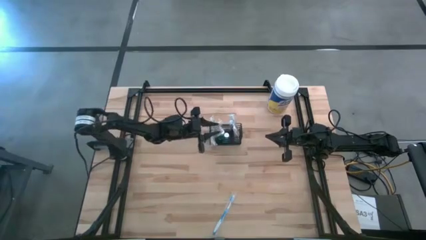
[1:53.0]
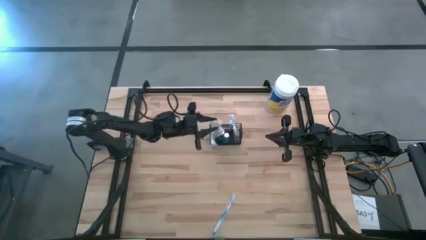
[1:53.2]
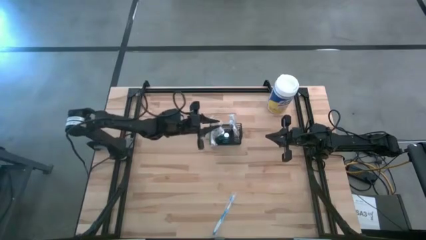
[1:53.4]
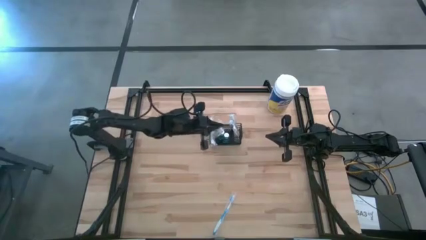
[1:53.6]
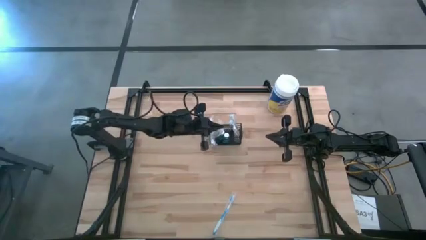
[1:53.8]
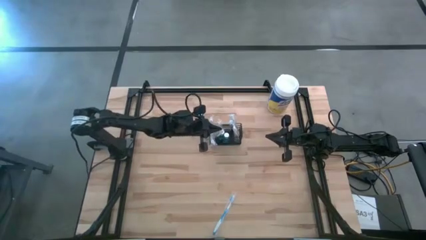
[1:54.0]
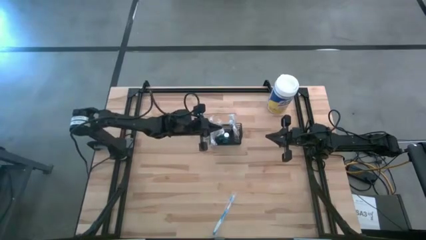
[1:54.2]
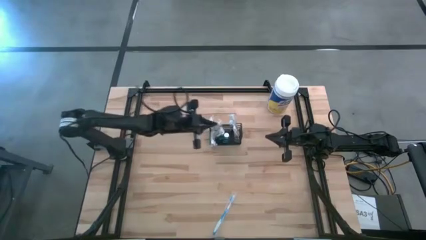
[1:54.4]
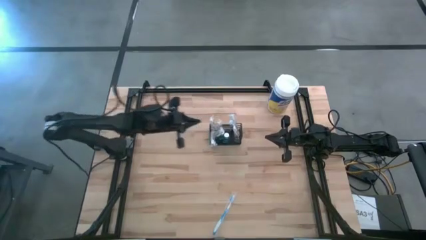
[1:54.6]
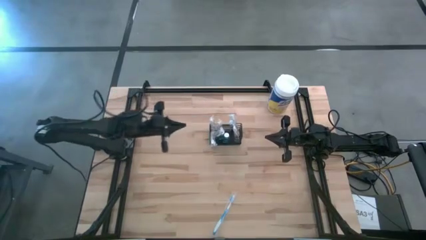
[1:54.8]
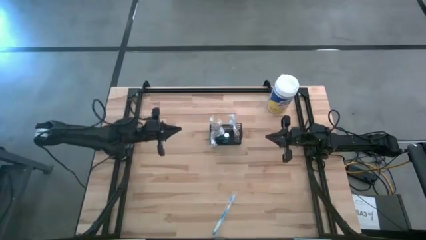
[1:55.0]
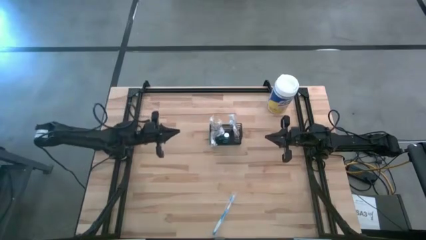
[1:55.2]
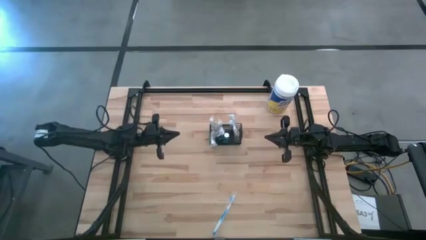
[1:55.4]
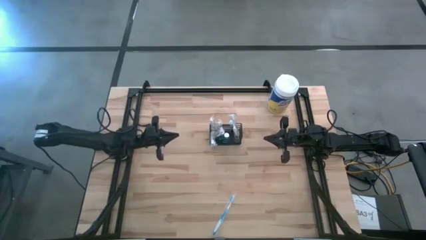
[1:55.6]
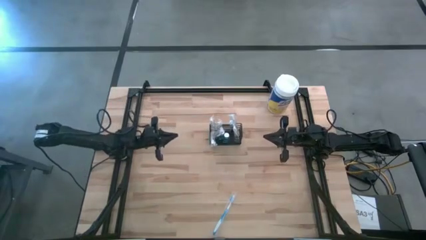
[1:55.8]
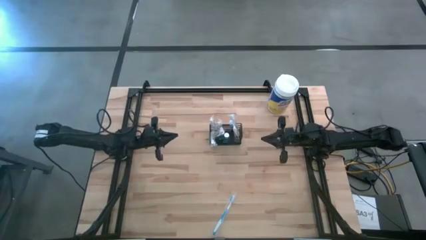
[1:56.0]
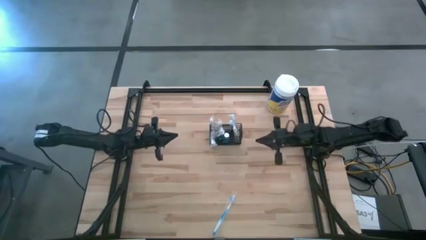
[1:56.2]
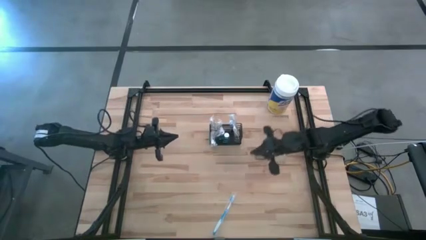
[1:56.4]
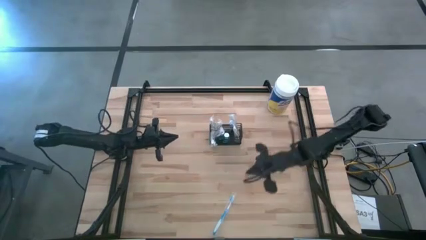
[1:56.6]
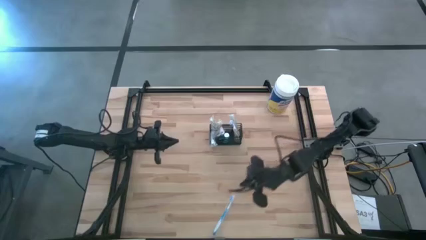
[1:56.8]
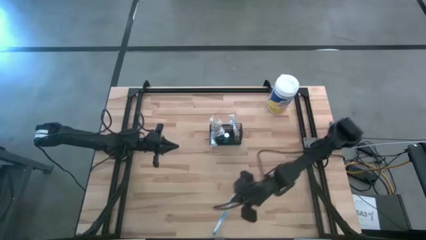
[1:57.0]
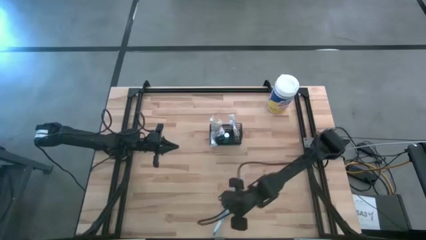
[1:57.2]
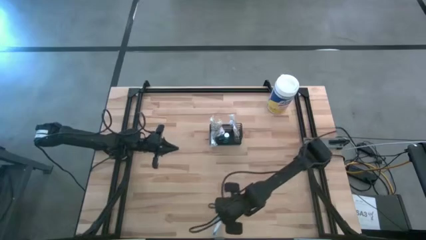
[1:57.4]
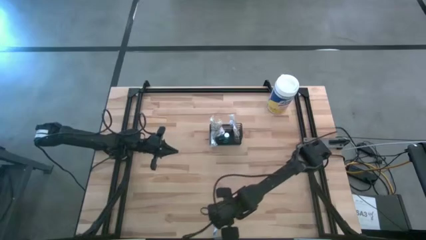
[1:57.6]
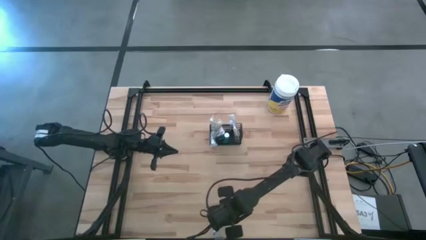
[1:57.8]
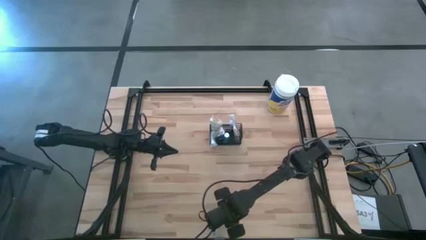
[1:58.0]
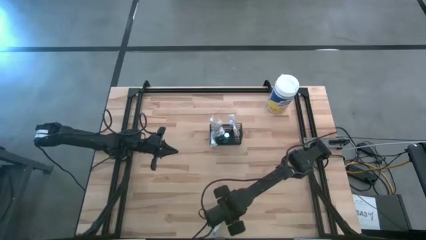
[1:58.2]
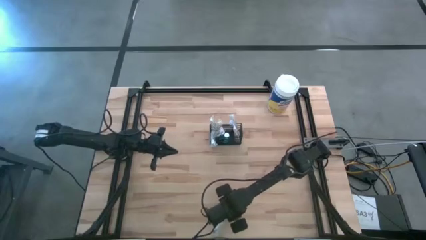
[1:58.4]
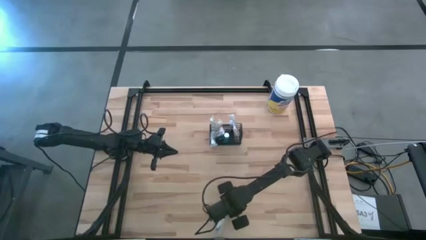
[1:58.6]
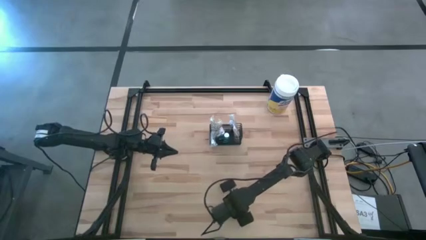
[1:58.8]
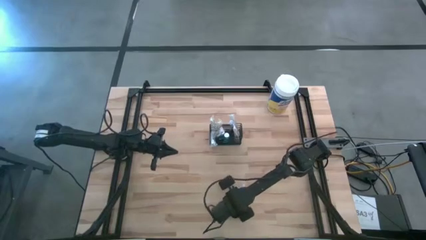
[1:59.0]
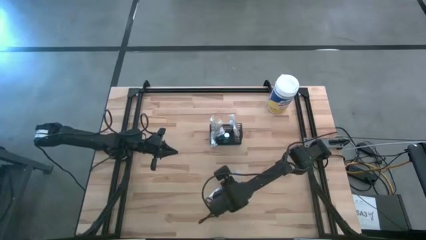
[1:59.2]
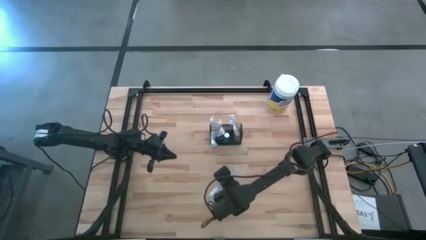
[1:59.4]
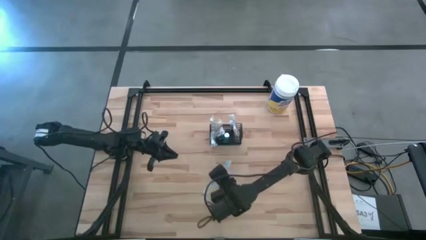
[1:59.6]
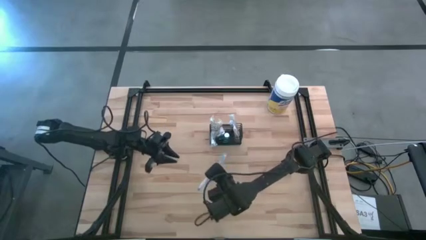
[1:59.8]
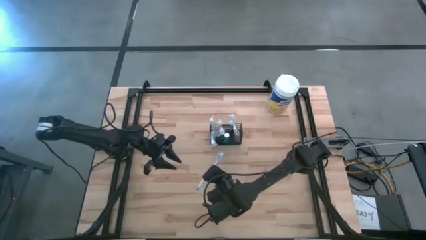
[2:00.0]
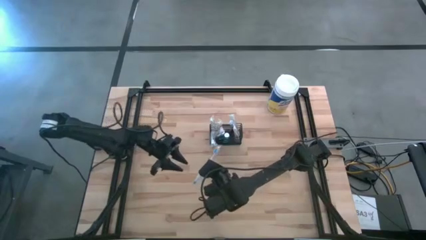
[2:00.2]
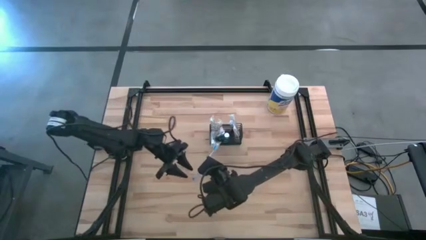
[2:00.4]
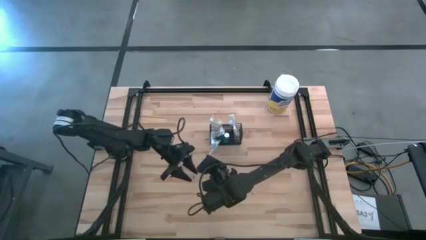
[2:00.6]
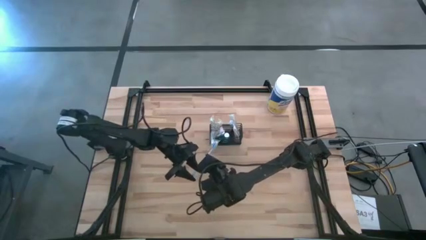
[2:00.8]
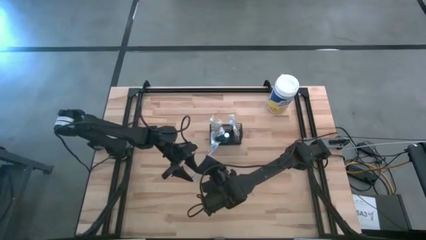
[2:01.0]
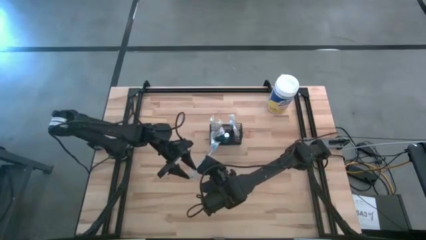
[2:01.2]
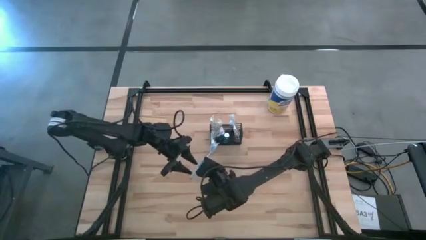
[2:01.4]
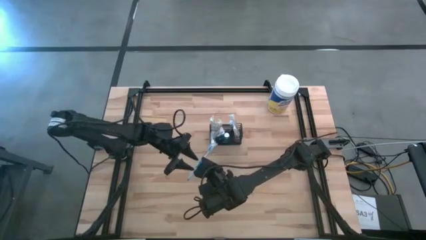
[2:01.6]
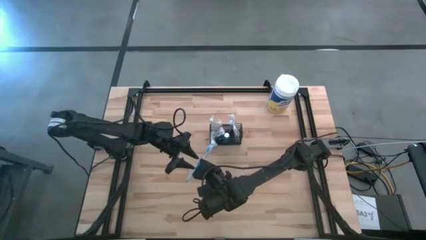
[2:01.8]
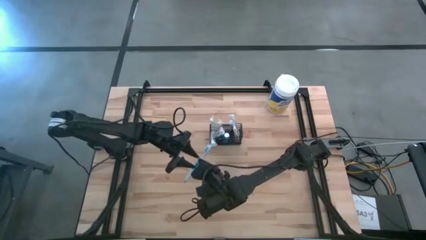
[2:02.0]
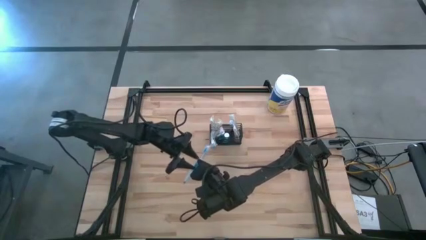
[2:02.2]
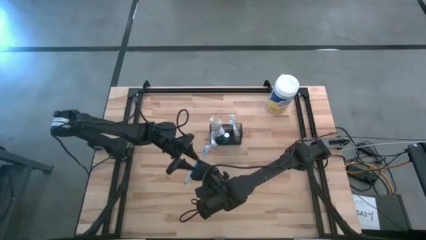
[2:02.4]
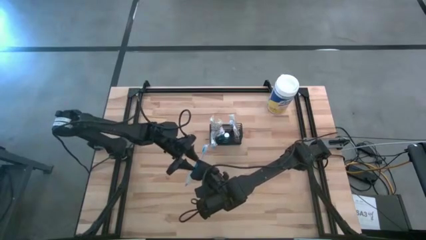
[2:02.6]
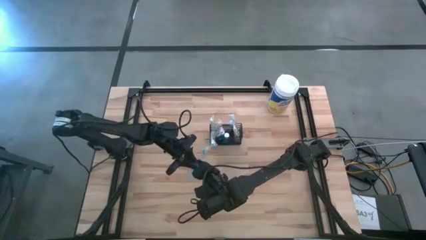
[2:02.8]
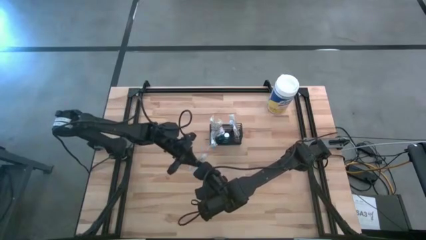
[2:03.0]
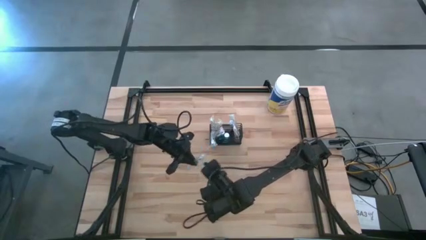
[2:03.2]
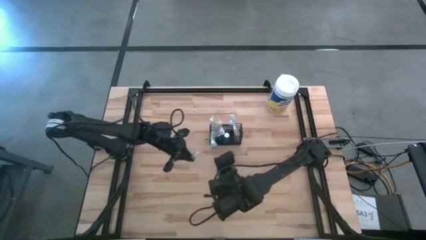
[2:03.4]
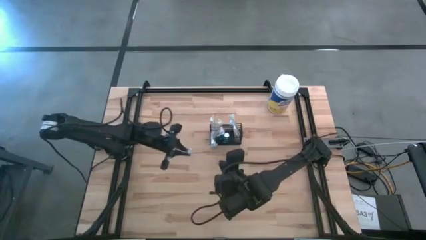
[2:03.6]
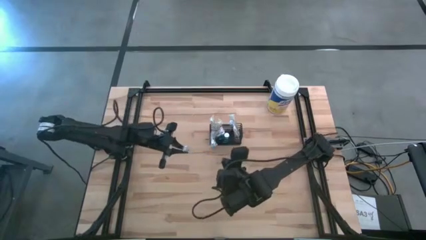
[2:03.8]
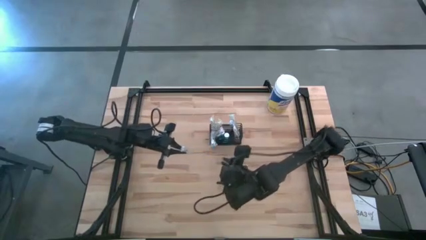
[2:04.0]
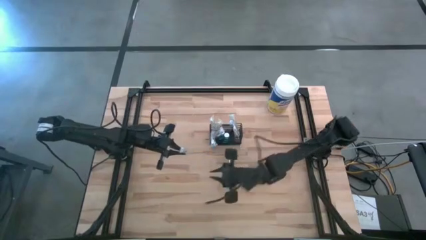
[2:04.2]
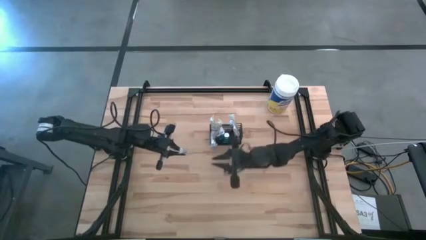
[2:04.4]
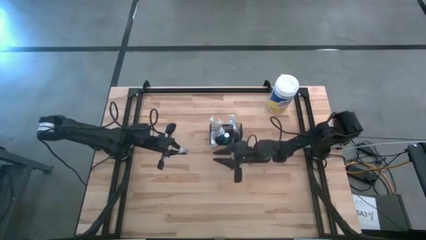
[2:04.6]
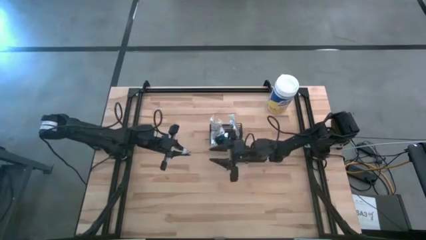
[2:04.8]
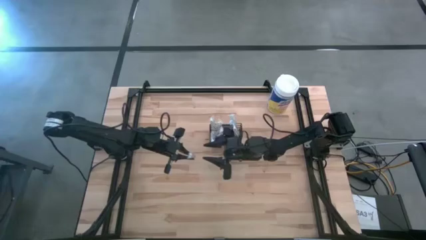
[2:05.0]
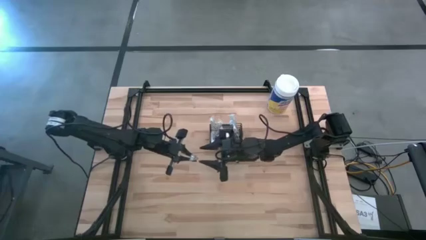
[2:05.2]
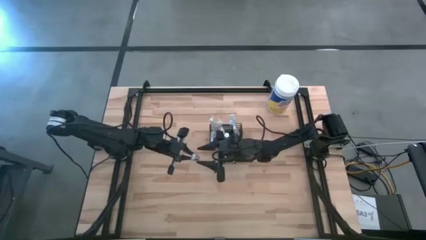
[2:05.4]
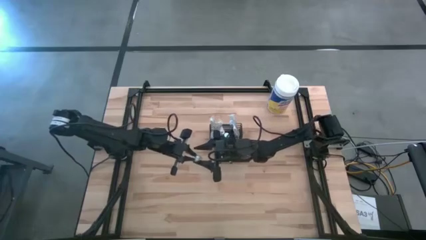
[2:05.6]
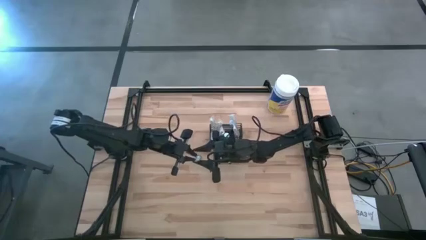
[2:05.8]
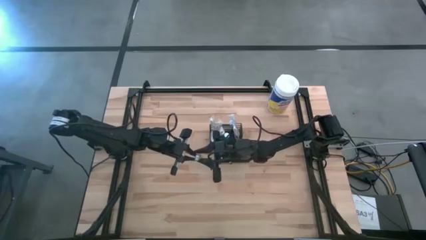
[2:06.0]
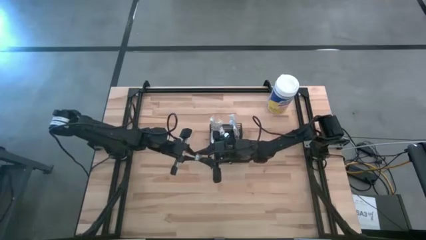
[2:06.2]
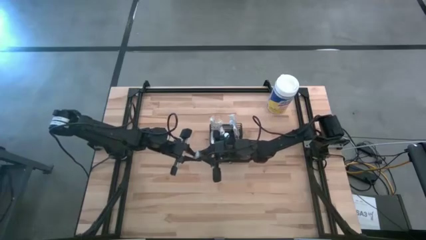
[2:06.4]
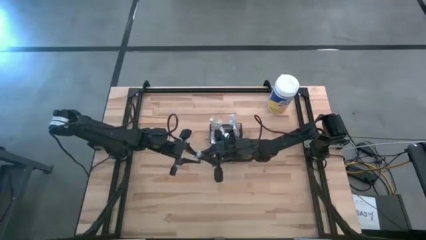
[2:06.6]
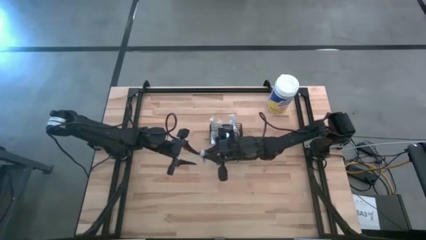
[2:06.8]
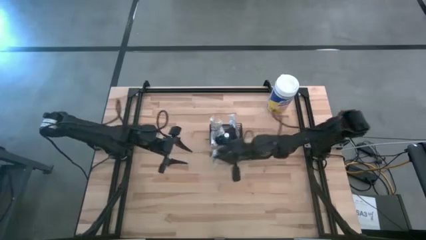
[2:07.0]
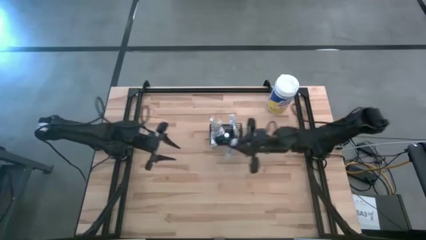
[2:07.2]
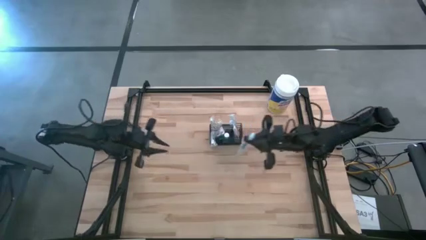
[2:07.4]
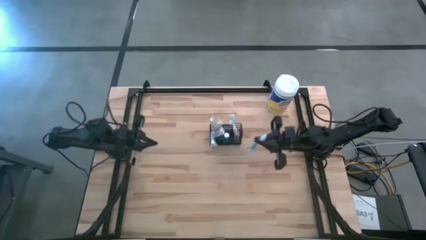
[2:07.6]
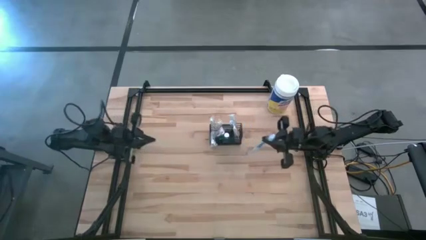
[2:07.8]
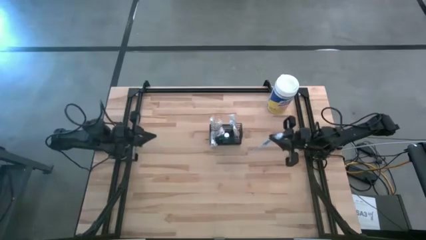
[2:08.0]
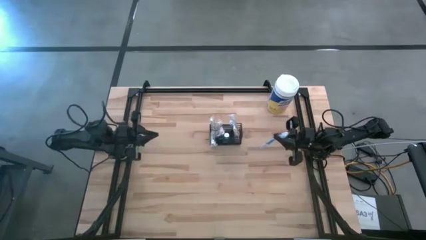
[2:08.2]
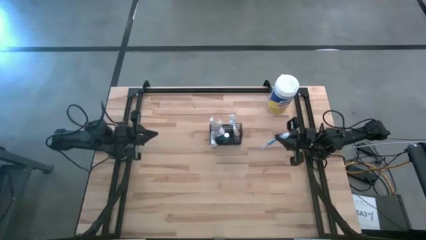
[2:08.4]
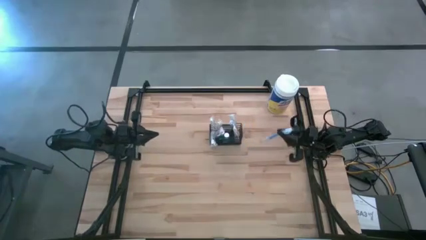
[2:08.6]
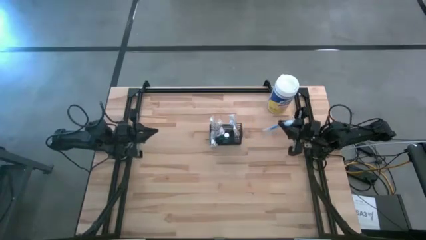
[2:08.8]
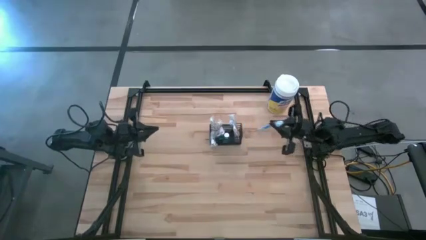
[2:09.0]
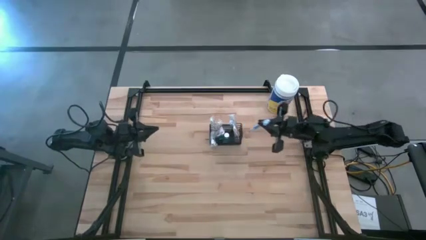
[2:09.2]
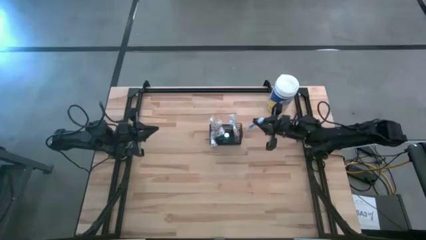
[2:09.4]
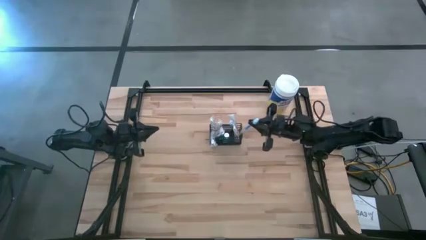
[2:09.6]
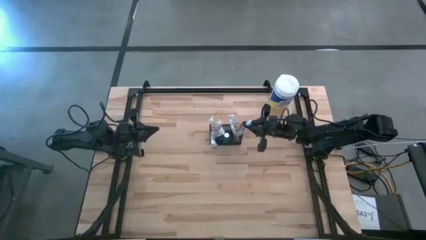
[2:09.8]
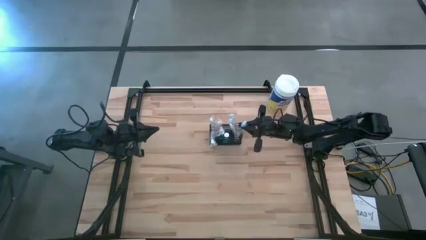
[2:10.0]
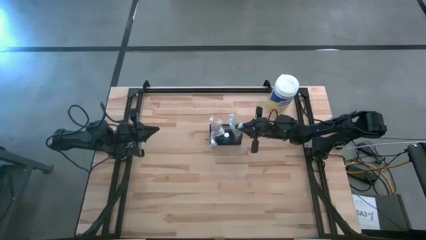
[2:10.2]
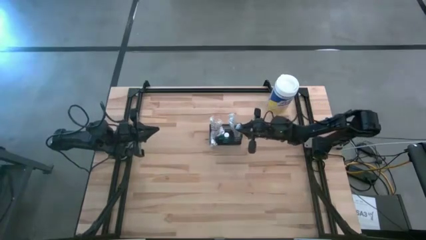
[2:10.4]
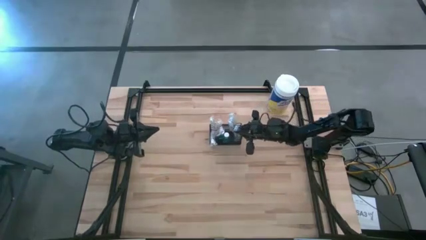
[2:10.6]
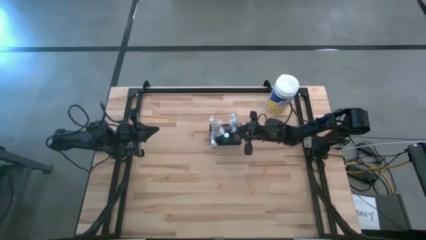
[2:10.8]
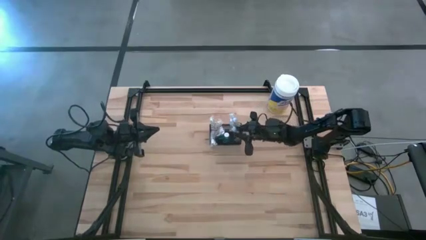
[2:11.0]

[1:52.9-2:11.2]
Task: Pick & Place toothbrushing station
Put the blue toothbrush into the black wire organizer
